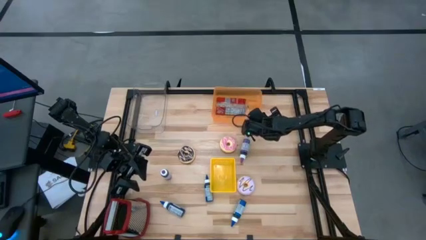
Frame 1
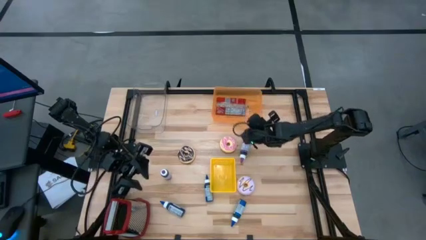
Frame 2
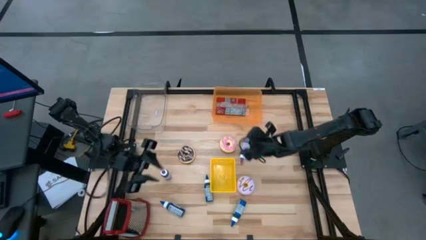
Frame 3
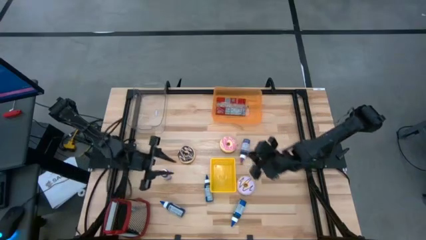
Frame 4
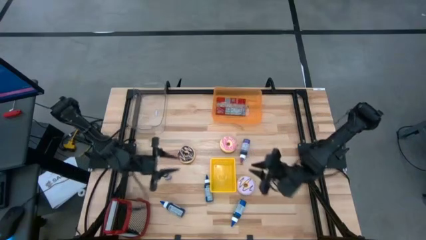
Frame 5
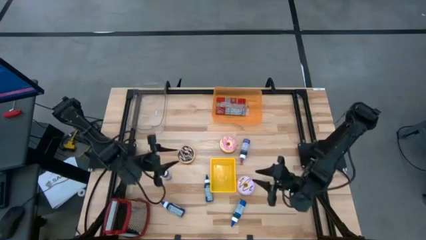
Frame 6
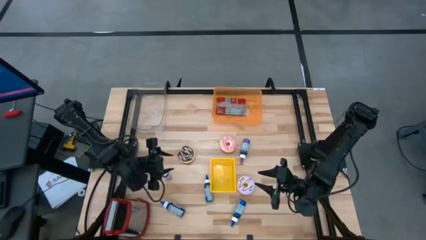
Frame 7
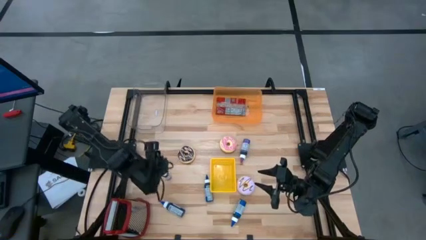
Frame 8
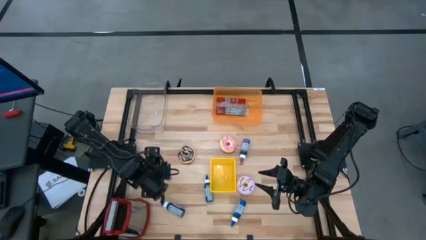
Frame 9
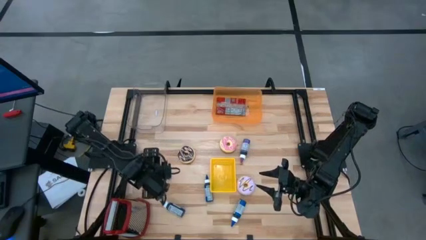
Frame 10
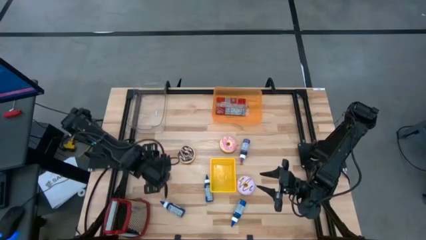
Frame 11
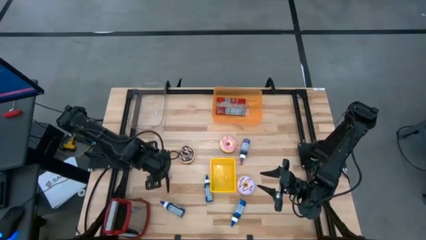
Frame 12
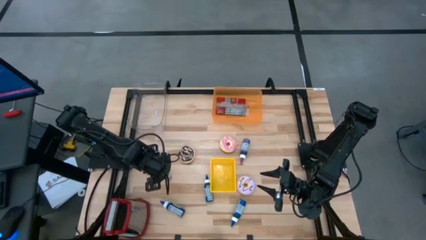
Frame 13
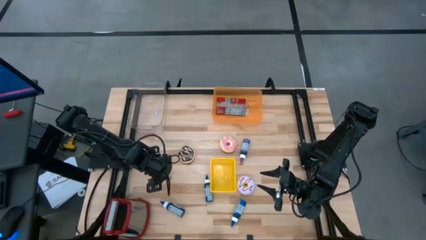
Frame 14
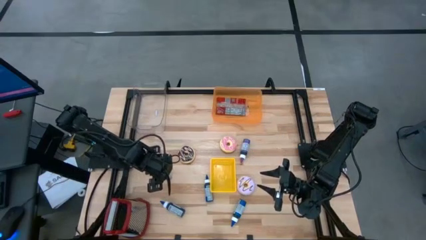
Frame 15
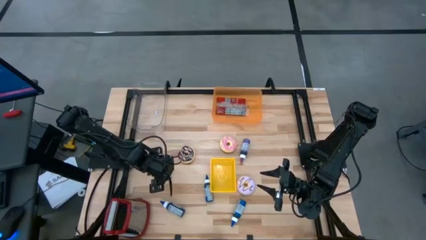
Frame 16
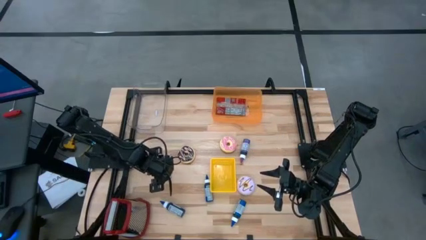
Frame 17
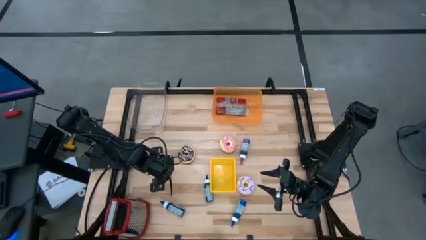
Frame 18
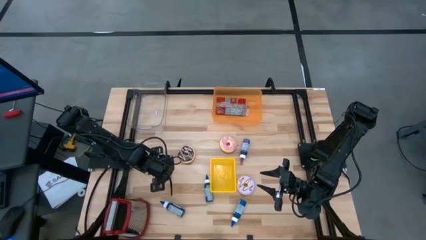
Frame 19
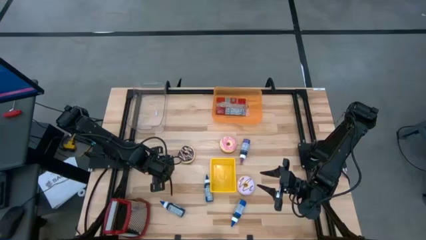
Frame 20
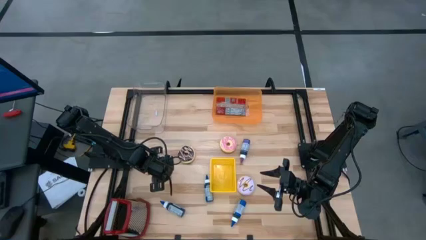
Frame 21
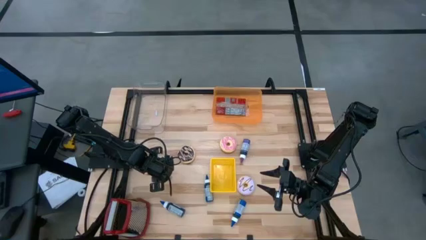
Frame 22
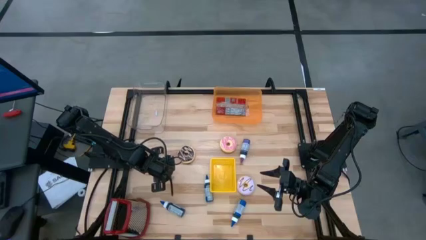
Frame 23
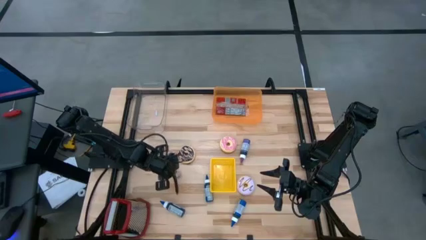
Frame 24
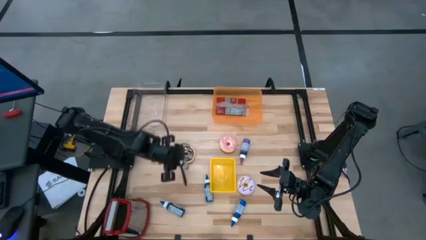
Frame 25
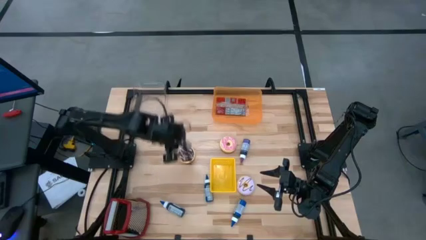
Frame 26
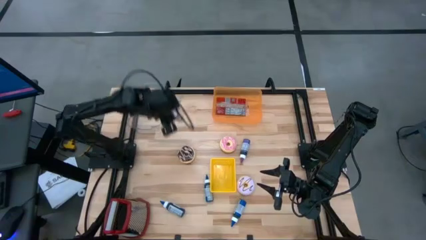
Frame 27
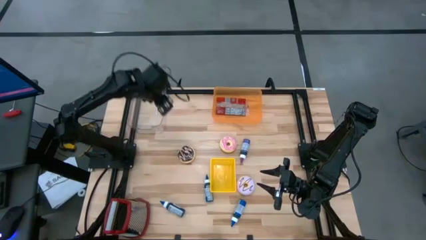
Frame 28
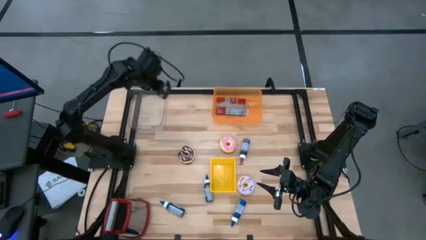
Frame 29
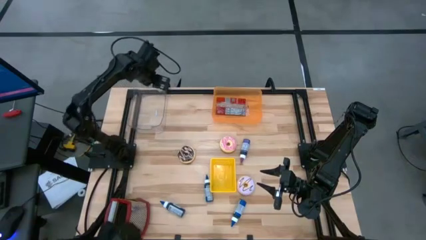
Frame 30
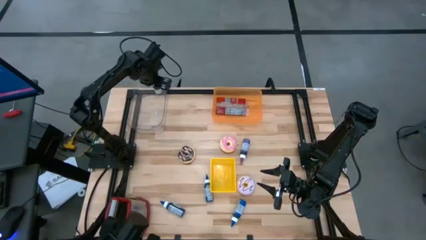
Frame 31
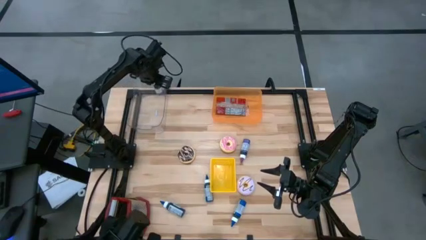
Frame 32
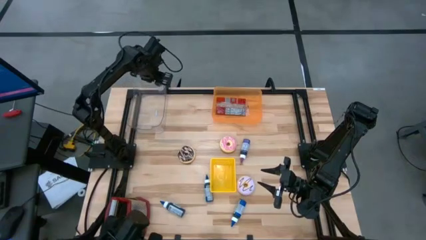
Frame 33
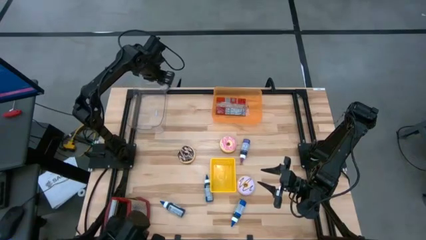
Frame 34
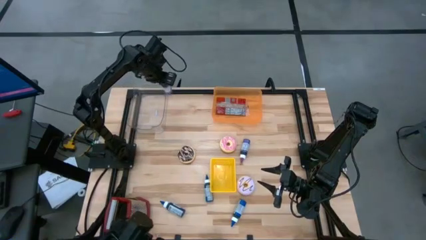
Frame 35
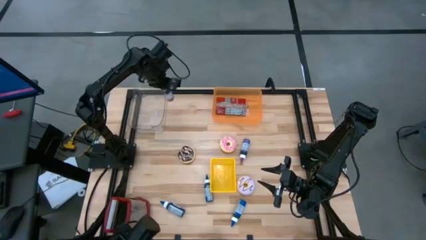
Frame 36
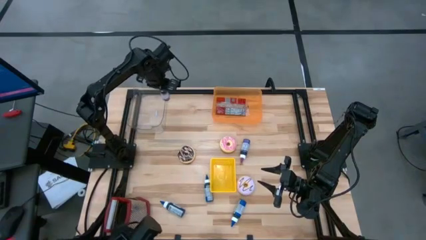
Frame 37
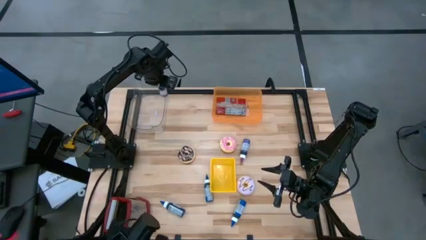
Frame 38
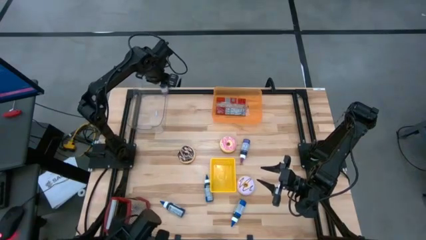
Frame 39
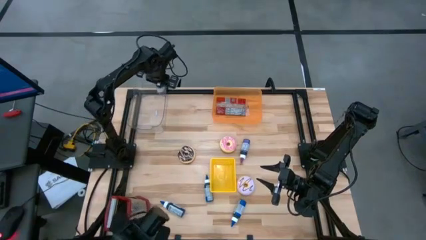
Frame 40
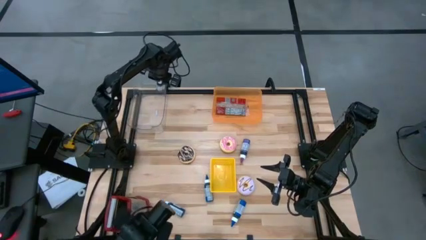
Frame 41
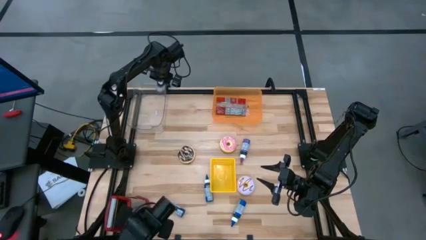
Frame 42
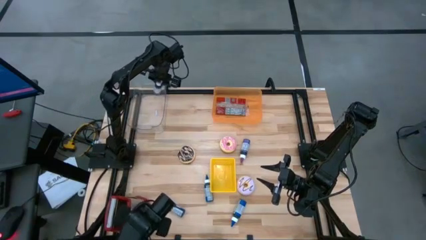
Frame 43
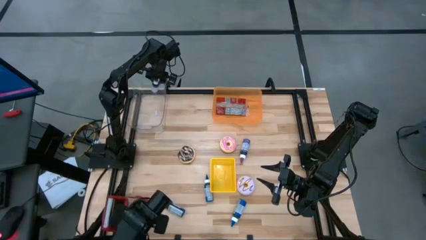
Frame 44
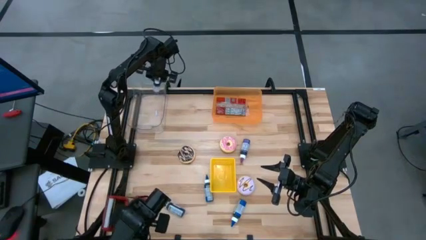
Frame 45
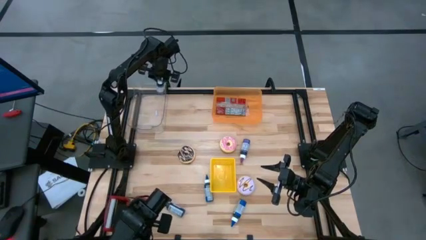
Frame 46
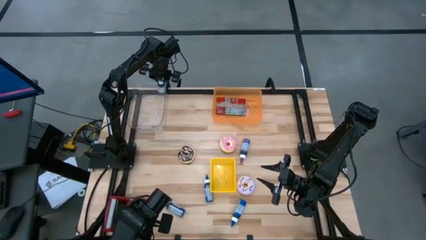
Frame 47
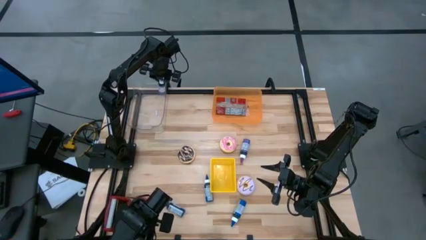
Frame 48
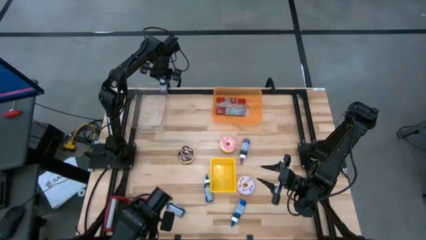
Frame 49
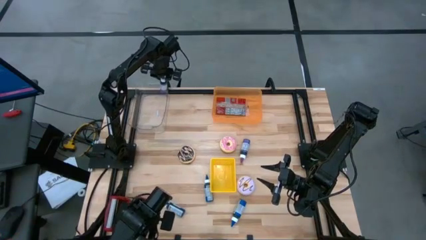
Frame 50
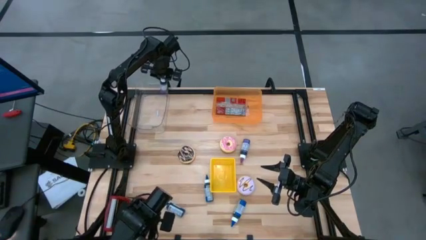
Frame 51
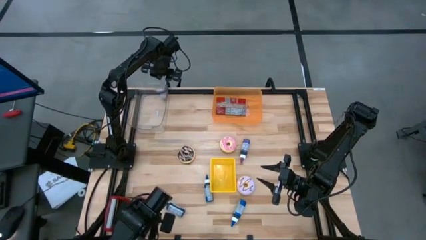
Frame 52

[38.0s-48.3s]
Put the left purple food coloring bottle into the transparent bin

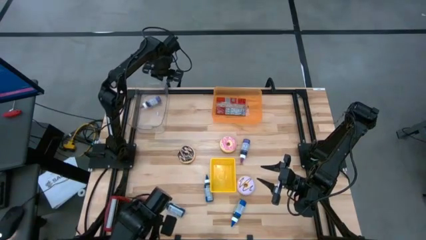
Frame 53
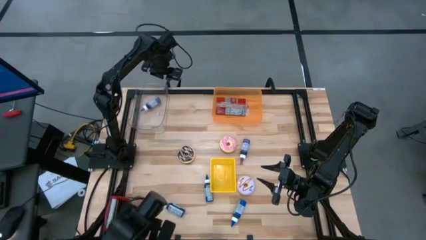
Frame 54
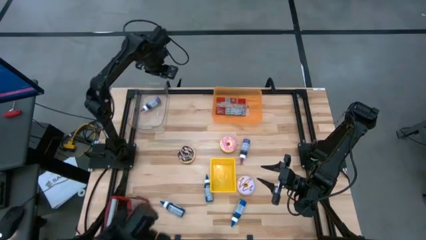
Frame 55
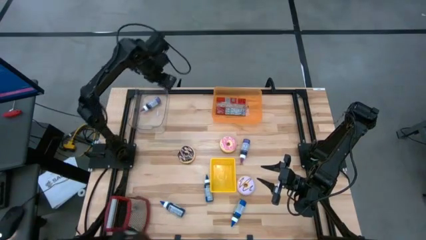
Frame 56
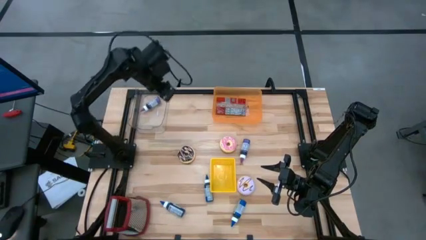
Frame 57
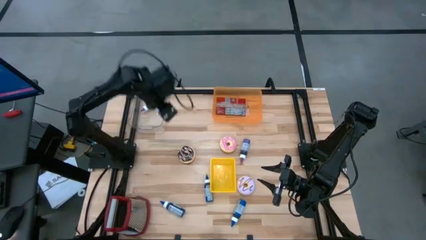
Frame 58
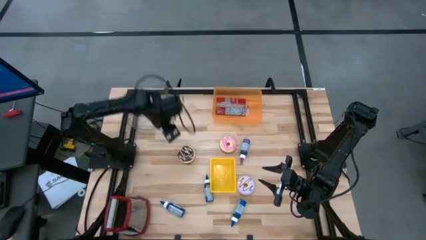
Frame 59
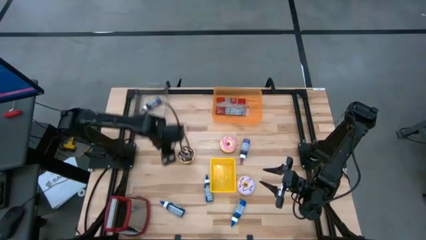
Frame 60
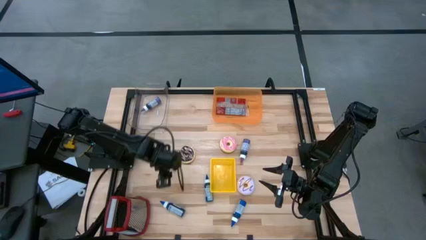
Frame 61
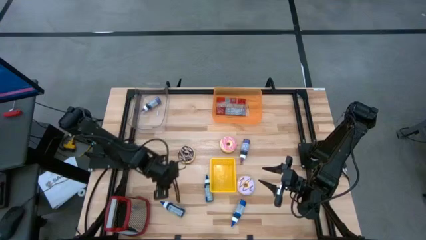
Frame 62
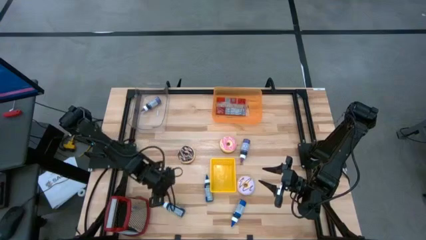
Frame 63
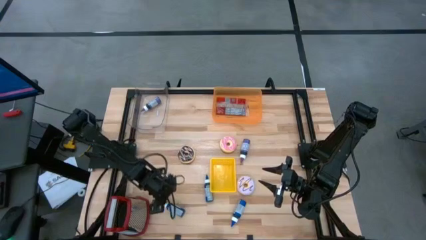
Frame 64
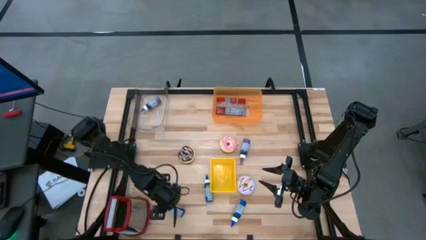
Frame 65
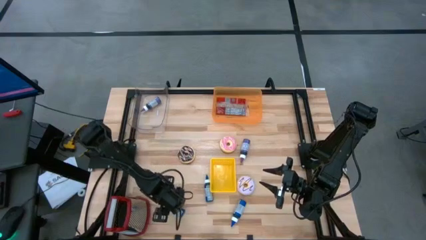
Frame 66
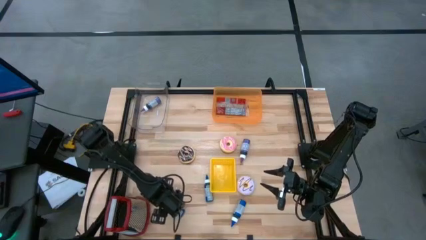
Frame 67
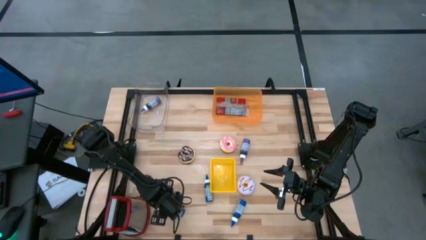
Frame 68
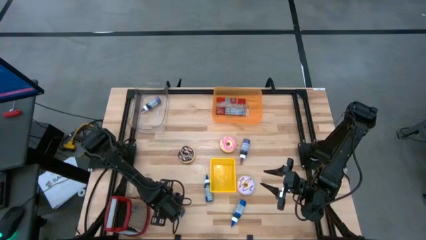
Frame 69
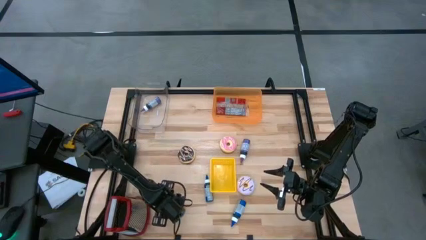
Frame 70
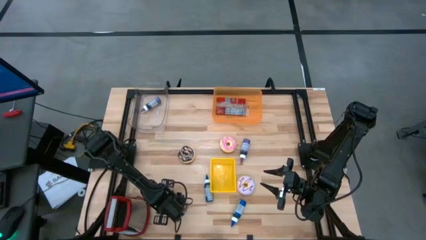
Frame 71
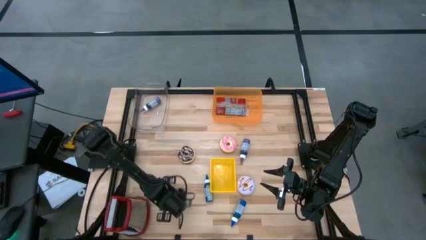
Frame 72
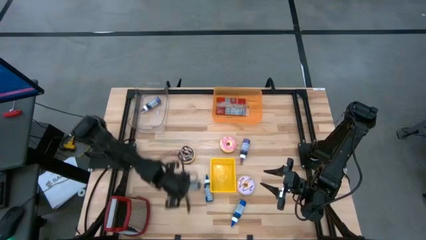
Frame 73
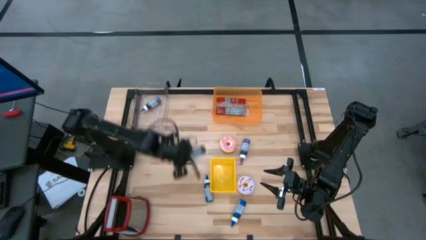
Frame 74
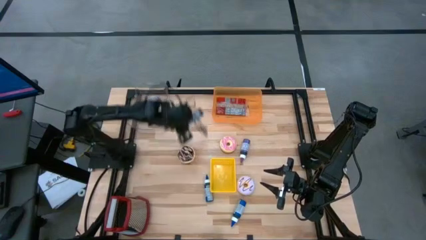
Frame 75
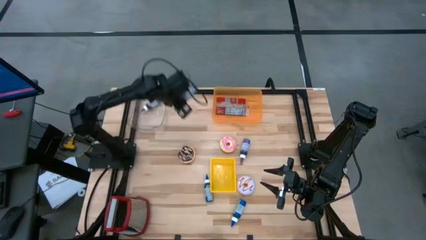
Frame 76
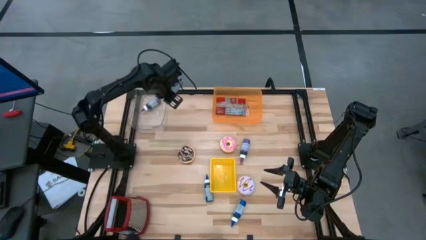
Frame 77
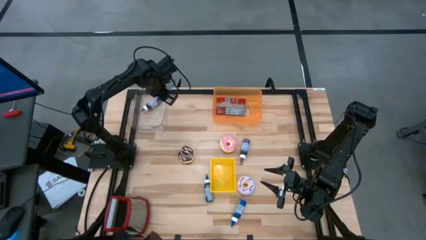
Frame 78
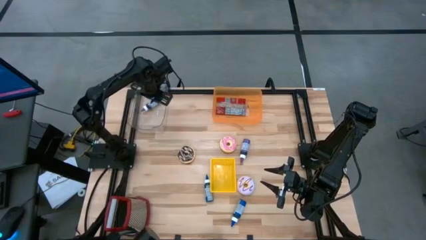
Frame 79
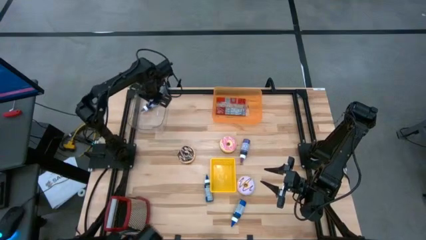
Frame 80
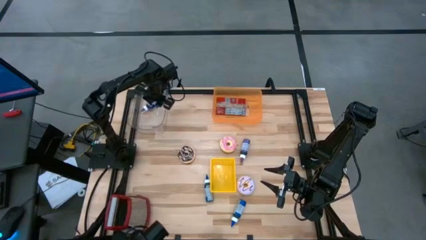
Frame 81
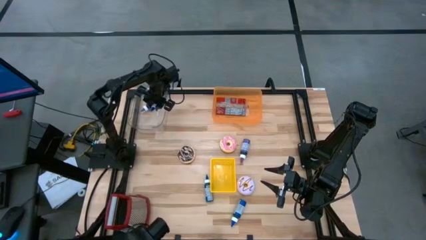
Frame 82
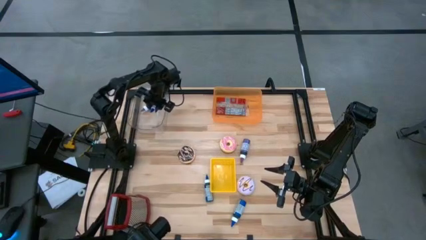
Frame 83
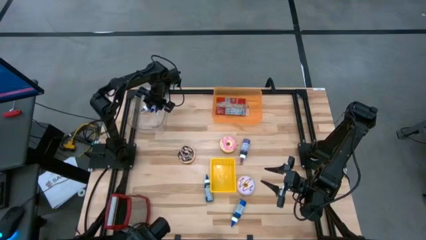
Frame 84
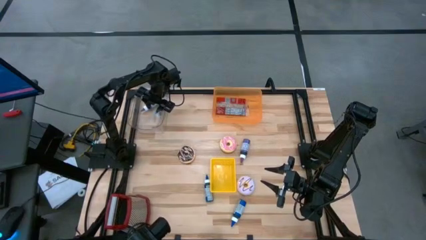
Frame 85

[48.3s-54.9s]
Put the bottom right blue food coloring bottle into the transparent bin
